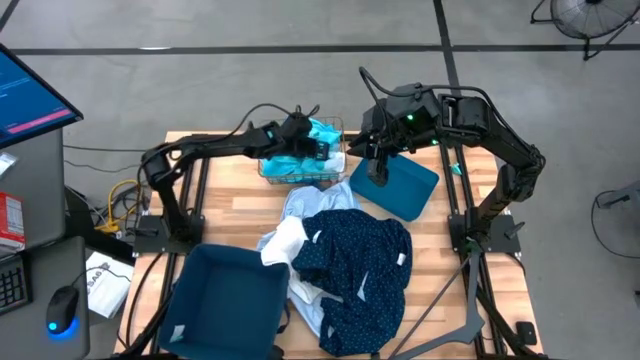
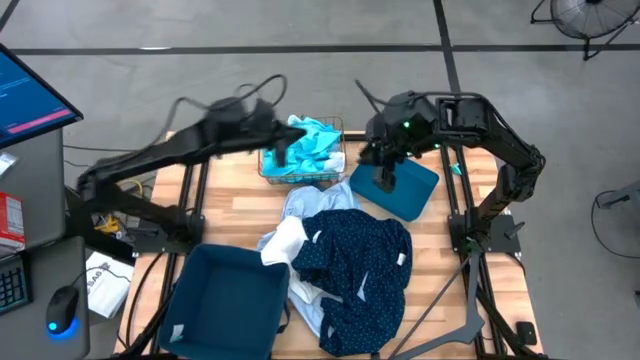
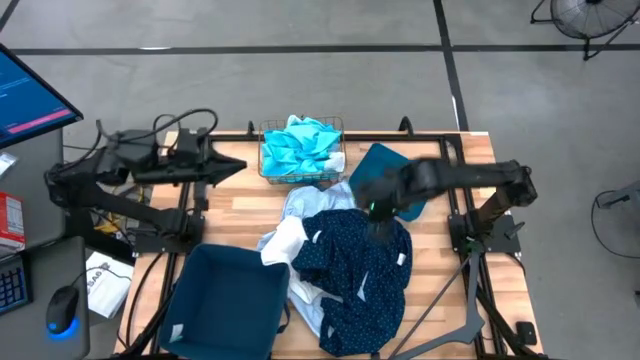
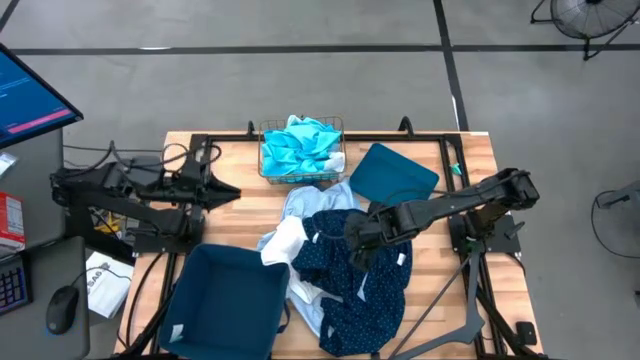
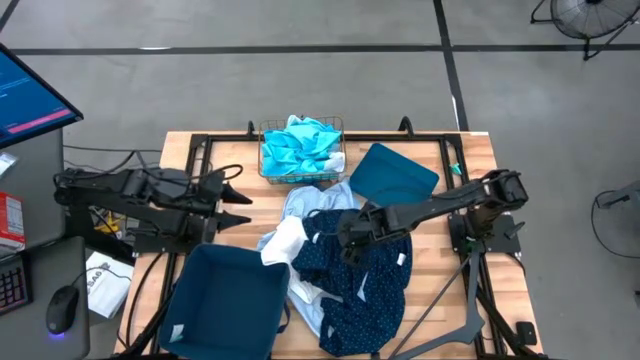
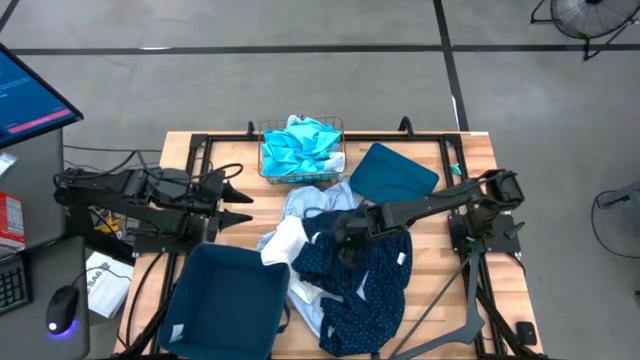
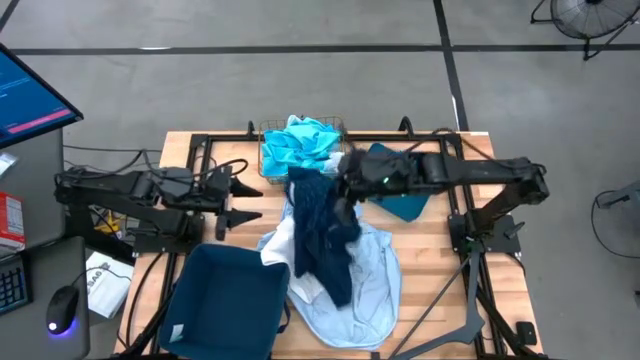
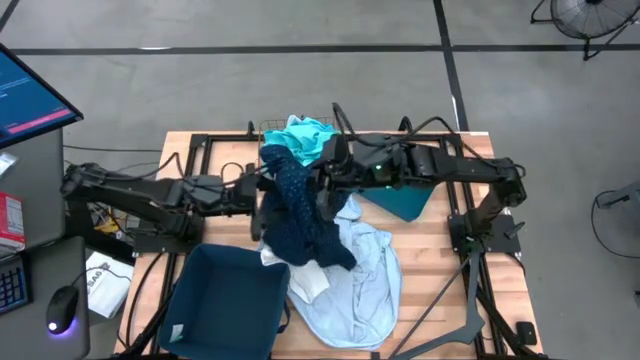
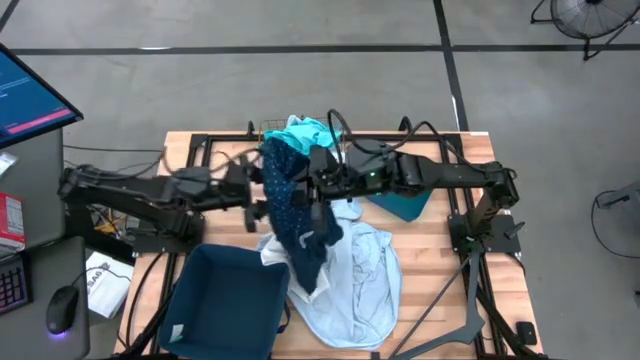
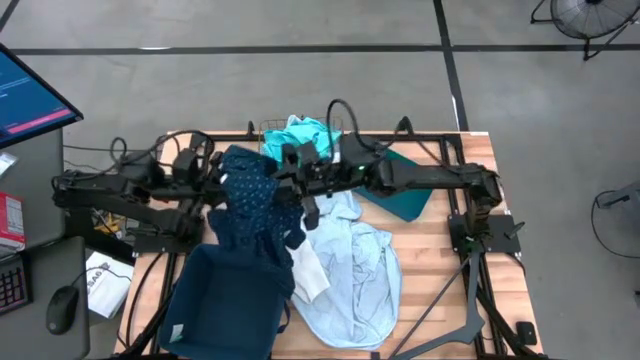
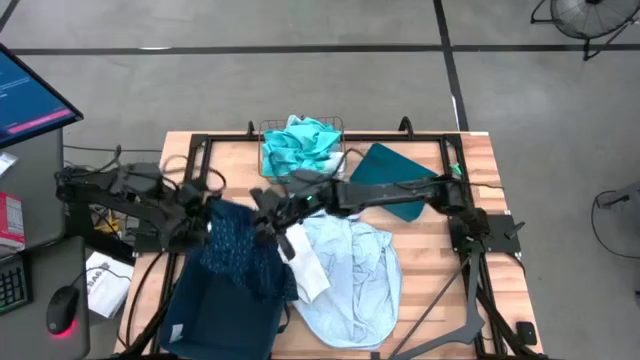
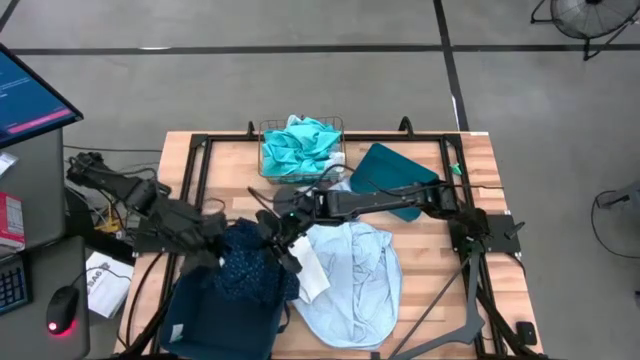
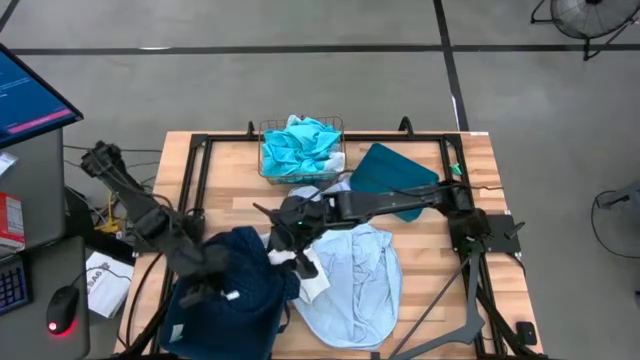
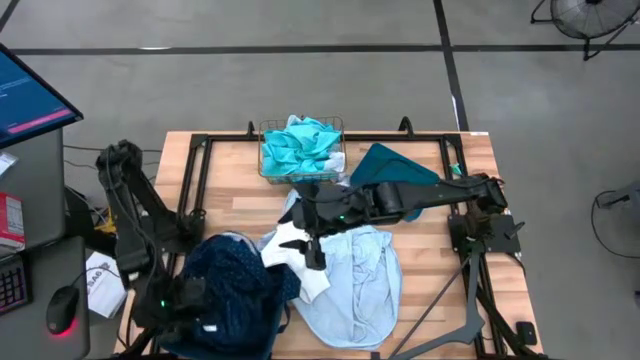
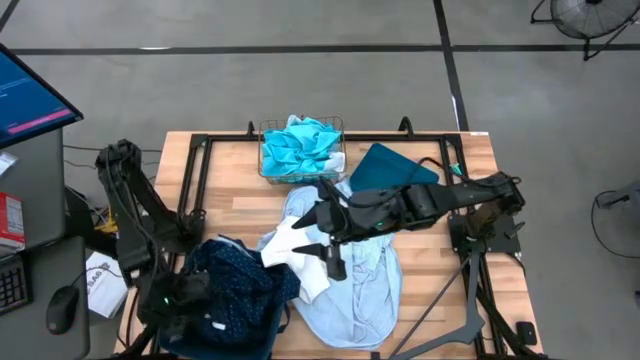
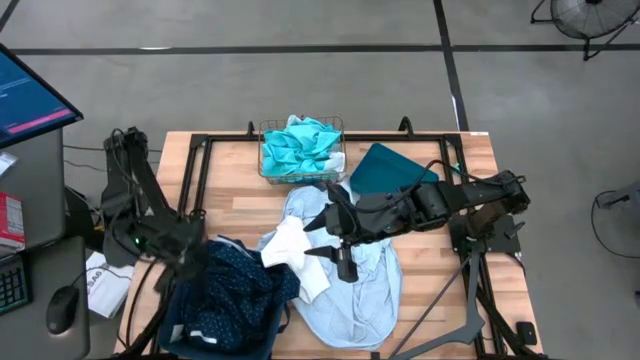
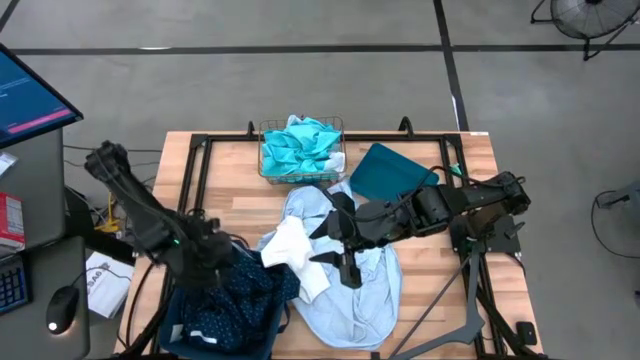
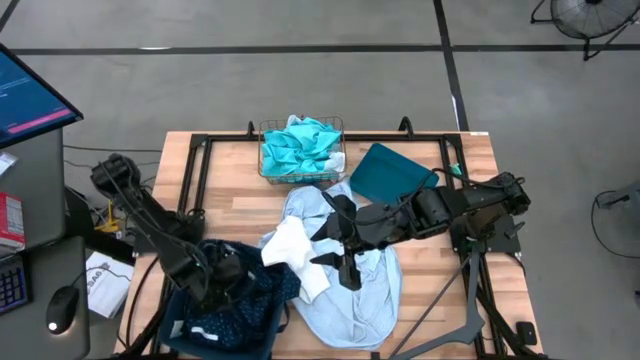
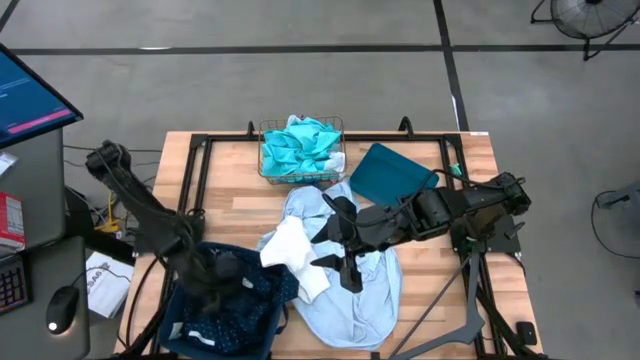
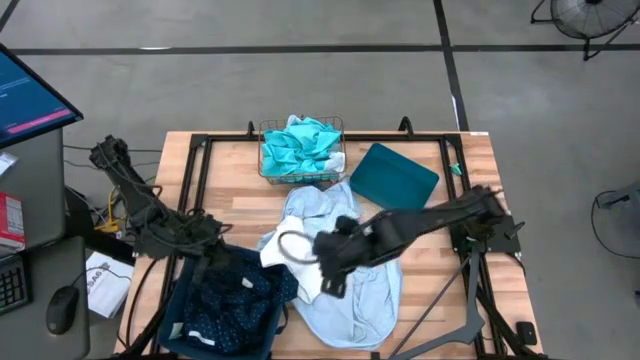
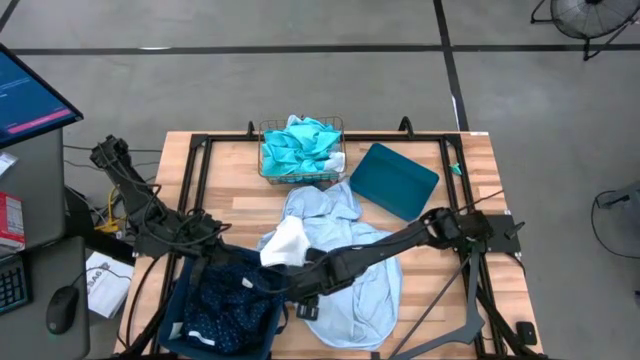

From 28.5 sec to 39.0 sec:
Task: Pick & Place Cloths
Put the dark blue polo shirt into the blue bin

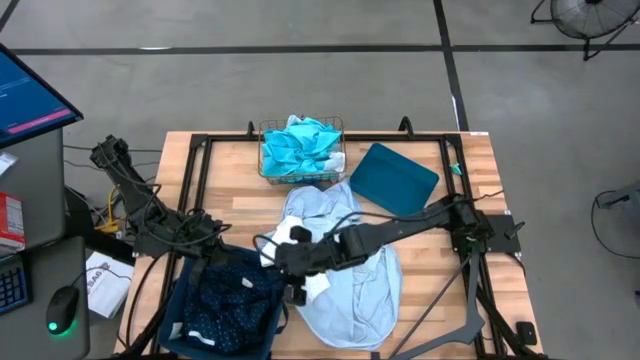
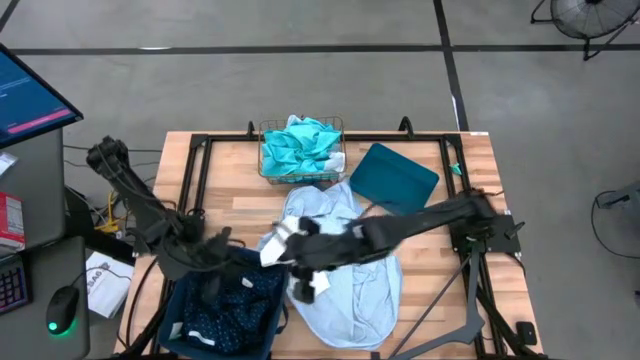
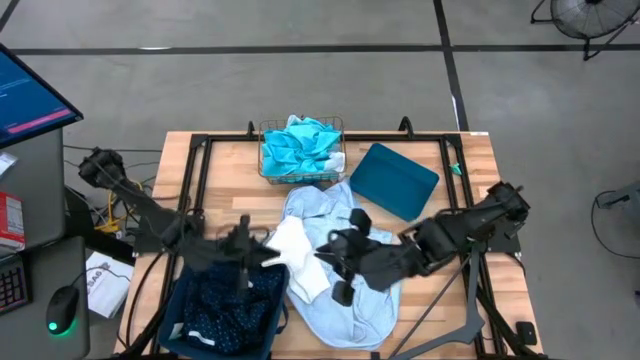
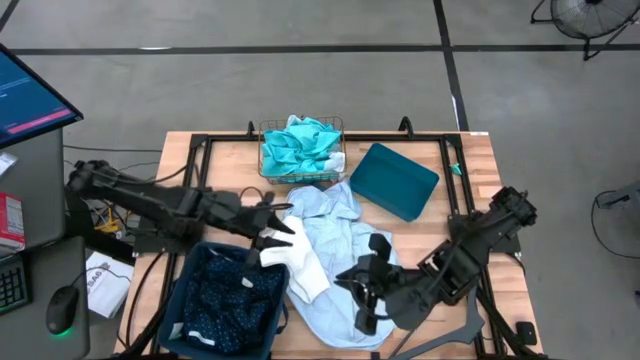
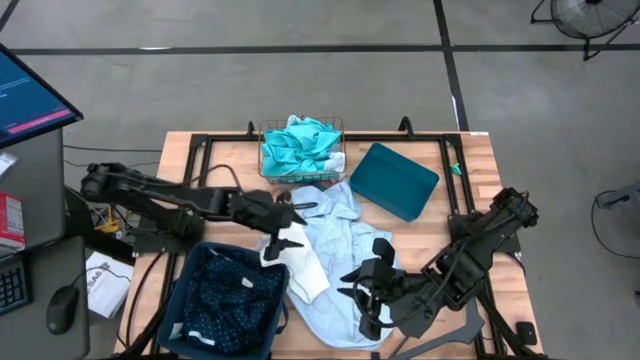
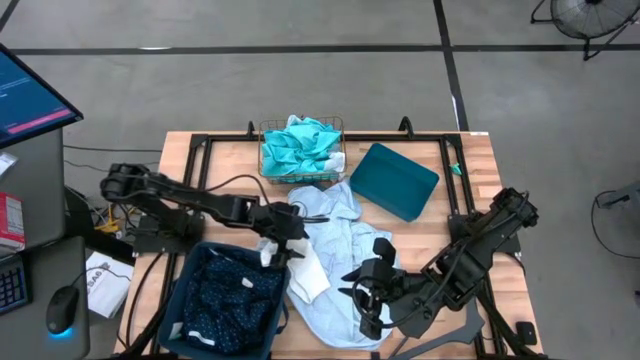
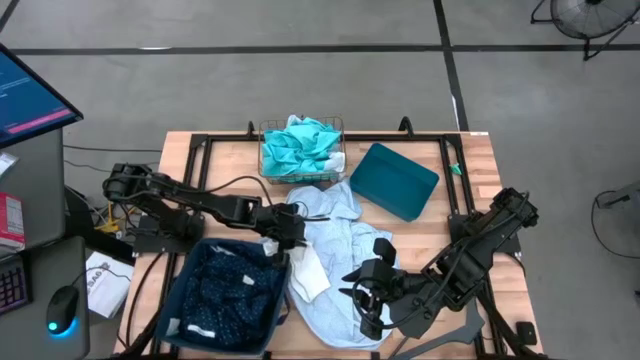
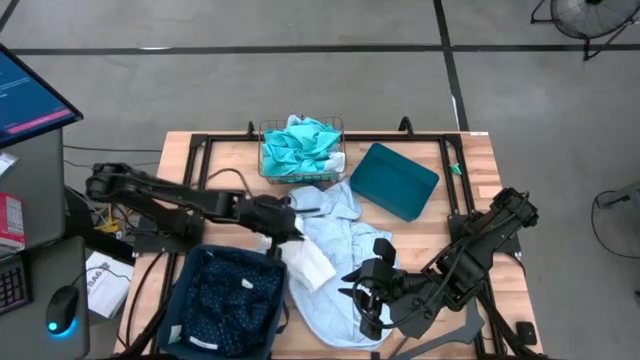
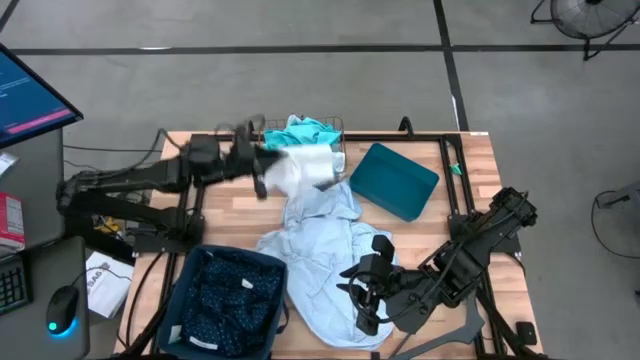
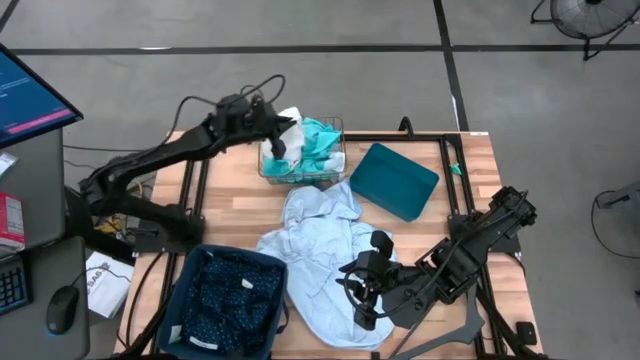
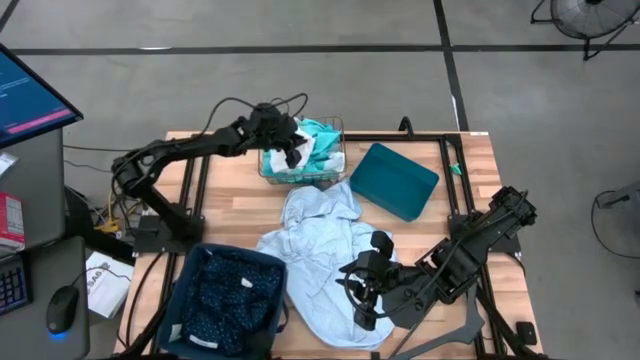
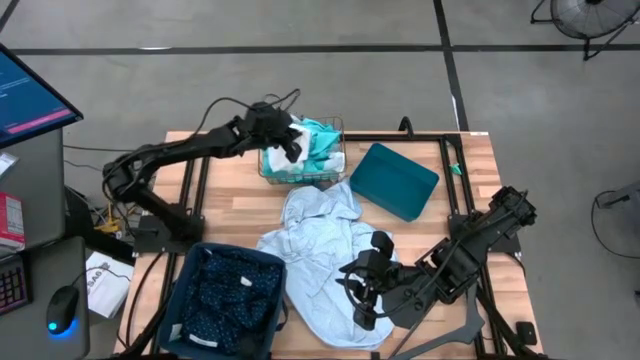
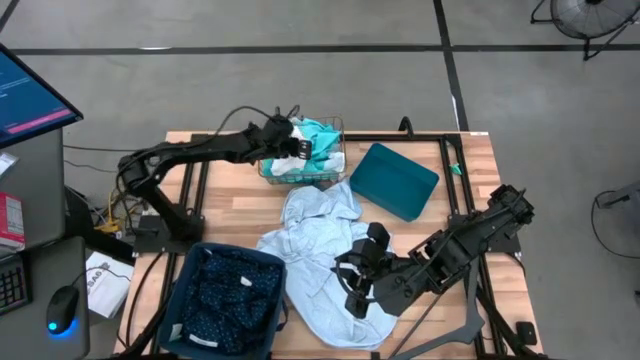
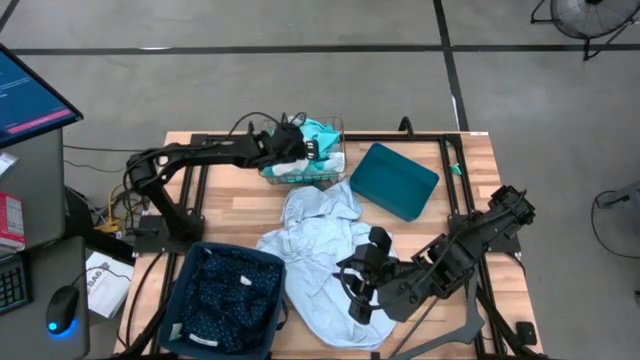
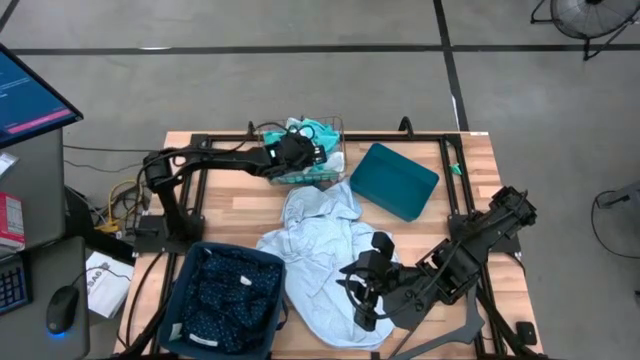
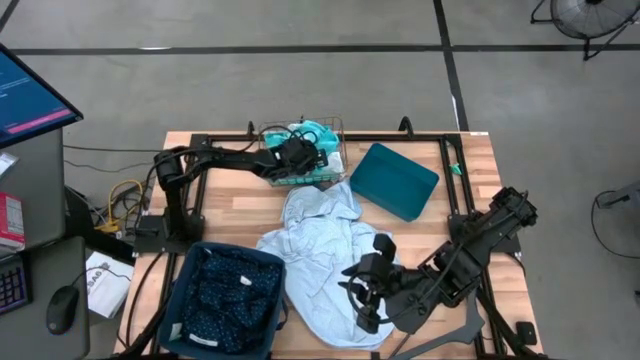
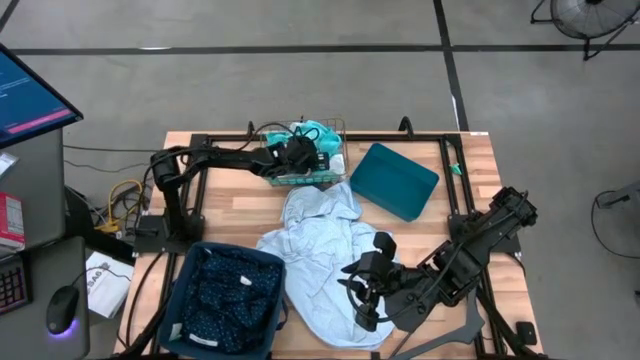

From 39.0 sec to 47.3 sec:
Put the white shorts into the gold basket

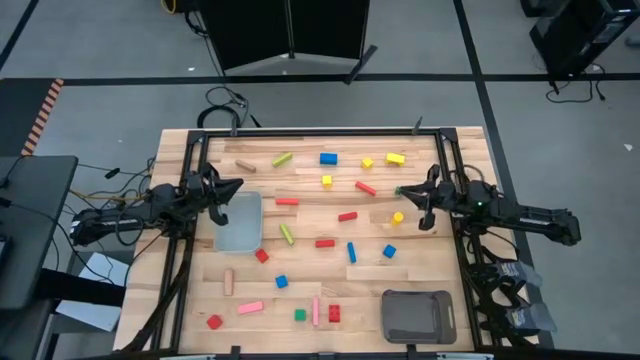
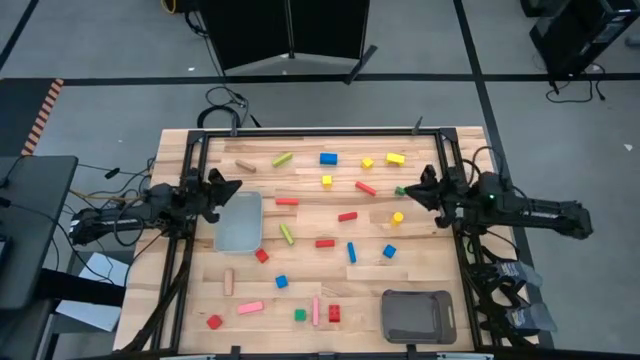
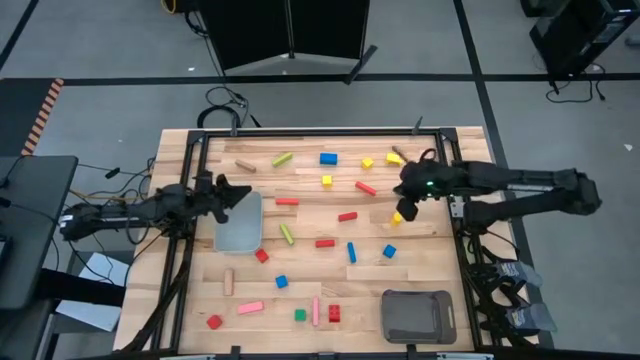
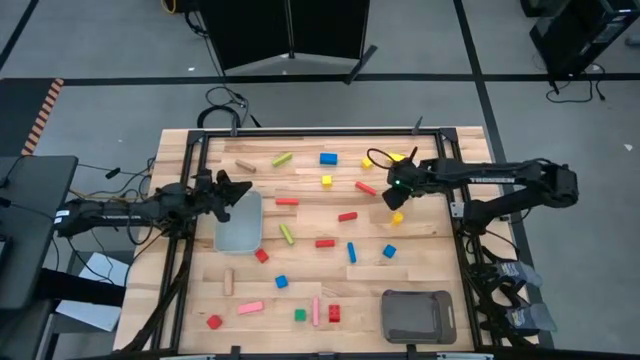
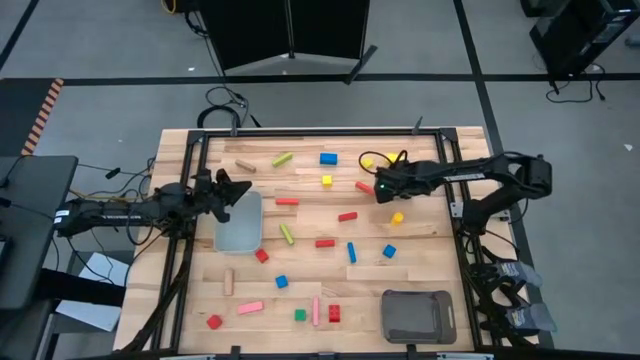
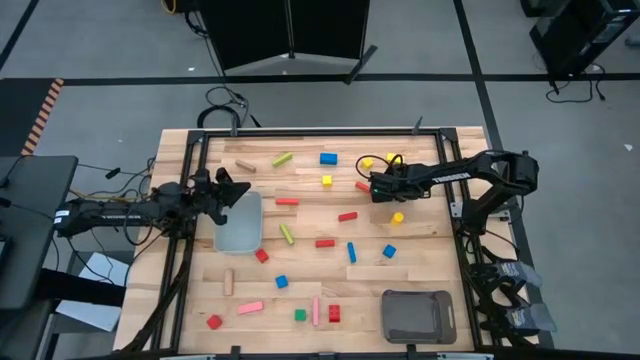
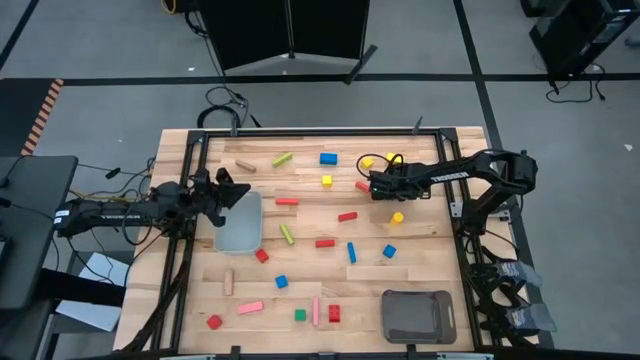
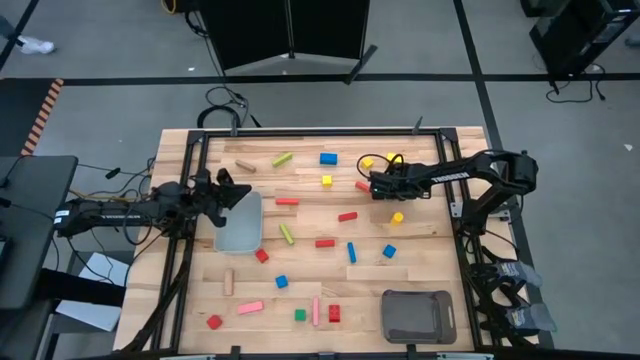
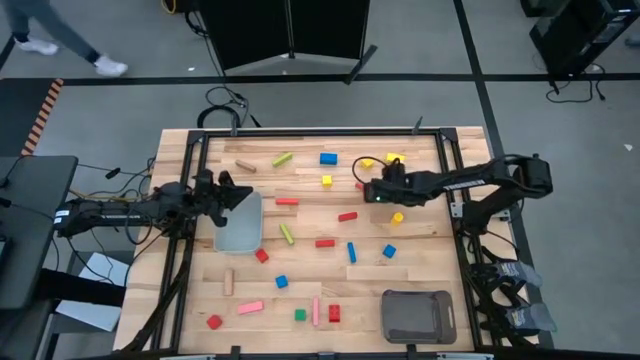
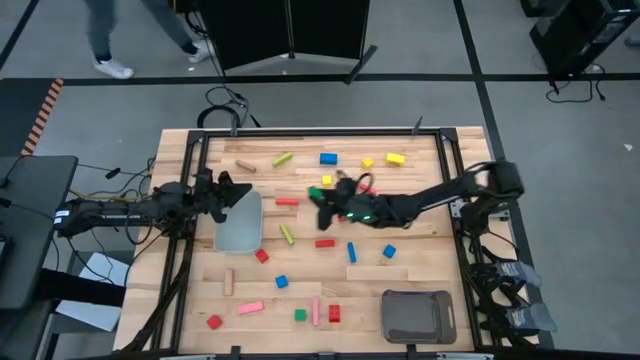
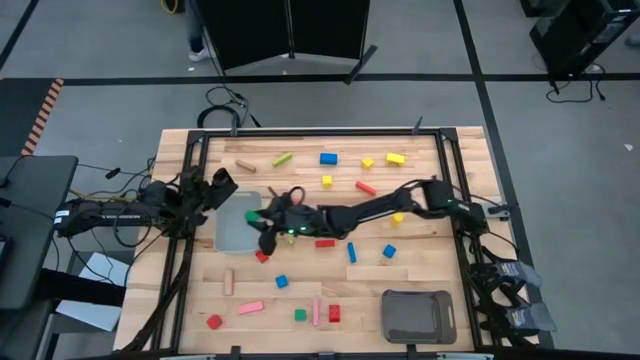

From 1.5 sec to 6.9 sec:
Task: Sort blocks by size
Put the top right green block into the grey bin
